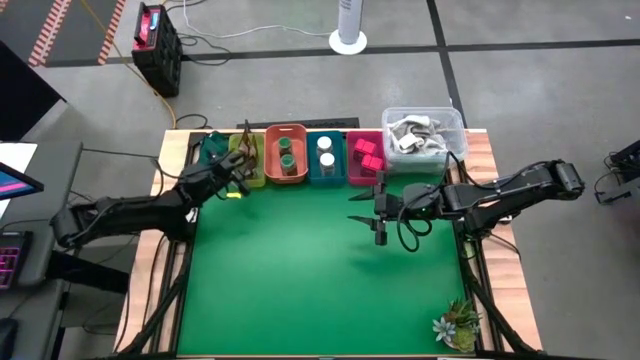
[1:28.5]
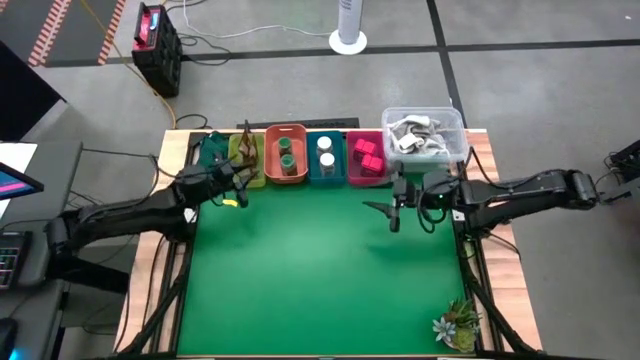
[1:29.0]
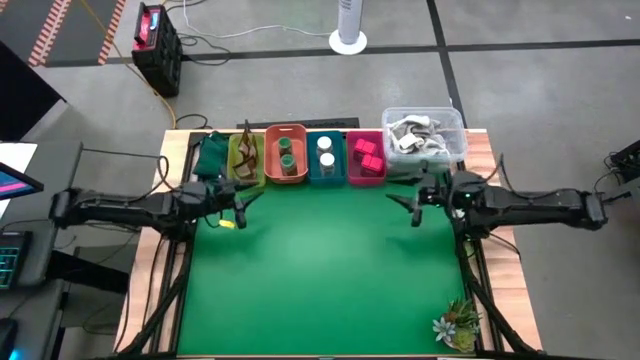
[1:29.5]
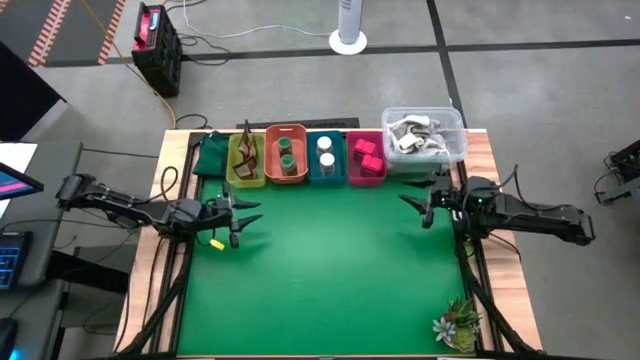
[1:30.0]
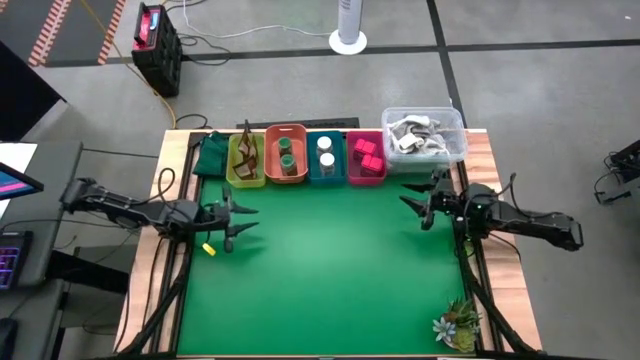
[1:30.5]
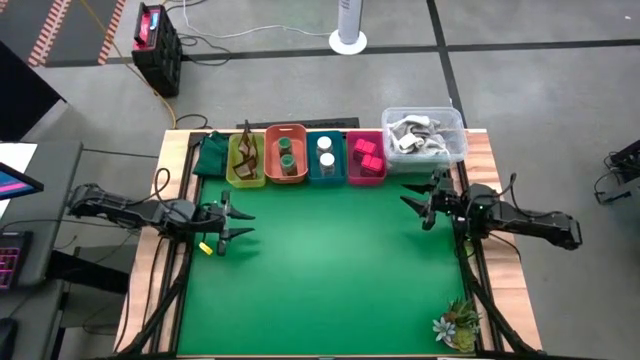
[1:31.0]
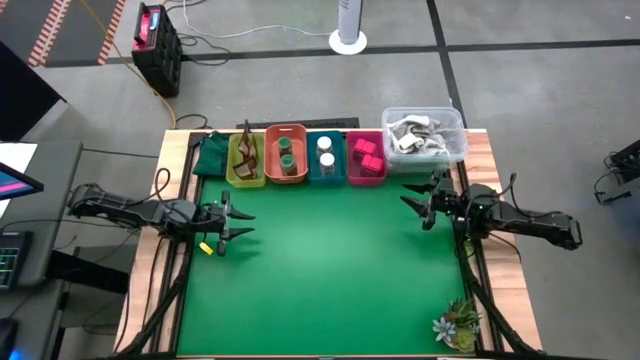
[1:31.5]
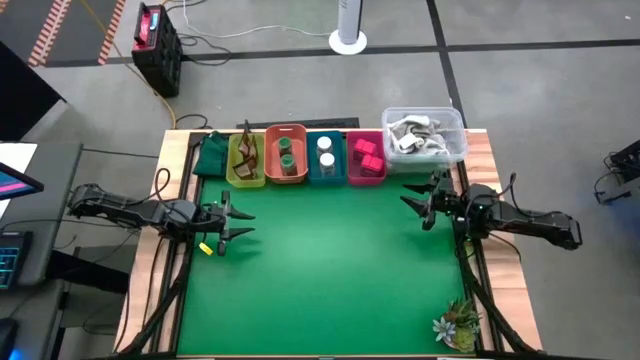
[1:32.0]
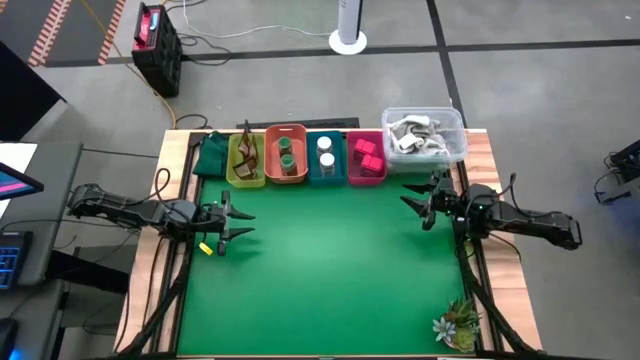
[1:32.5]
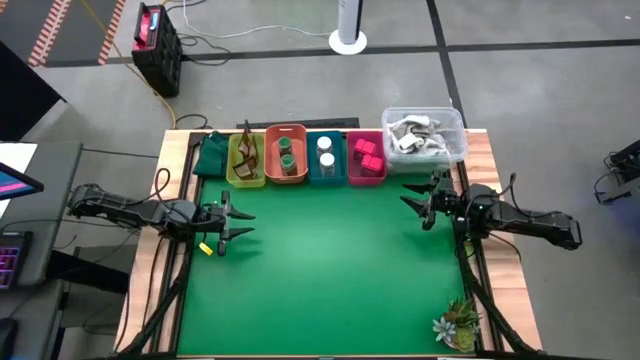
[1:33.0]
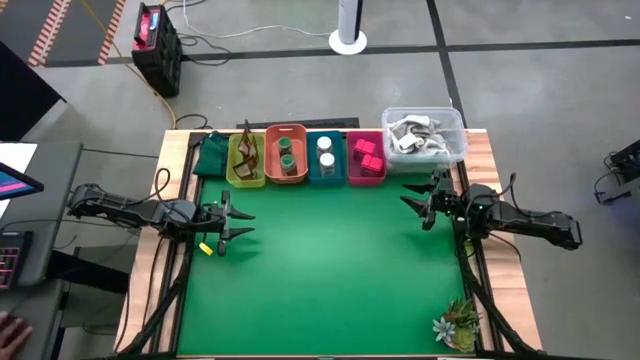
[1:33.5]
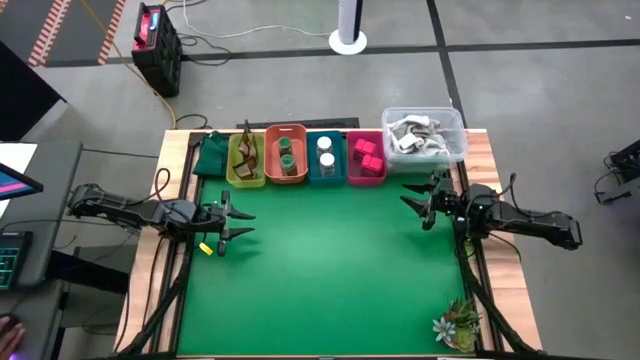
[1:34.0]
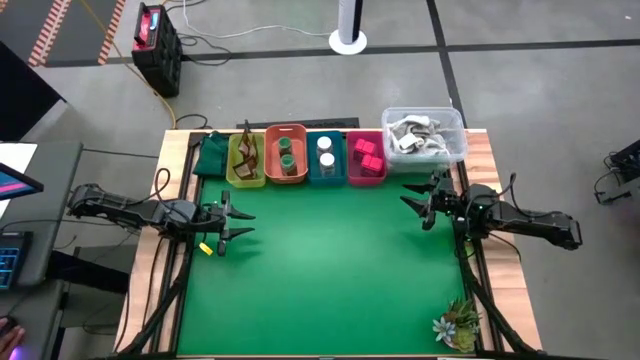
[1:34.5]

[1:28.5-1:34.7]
Task: Sort spices by type
Return to Home Position

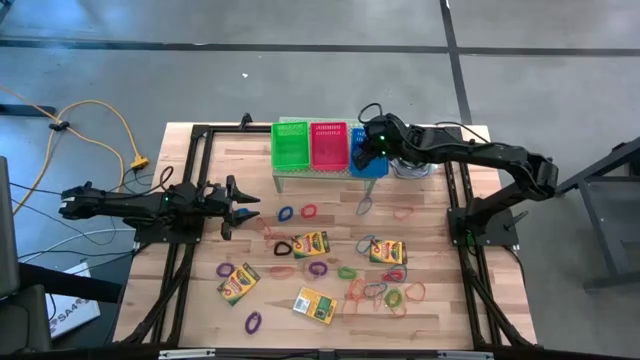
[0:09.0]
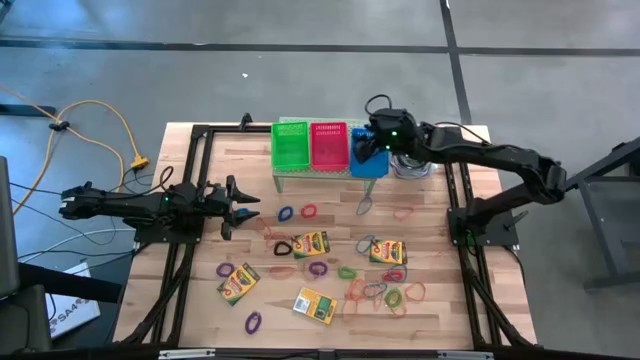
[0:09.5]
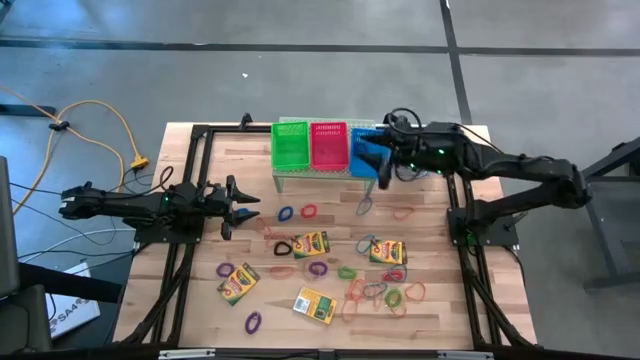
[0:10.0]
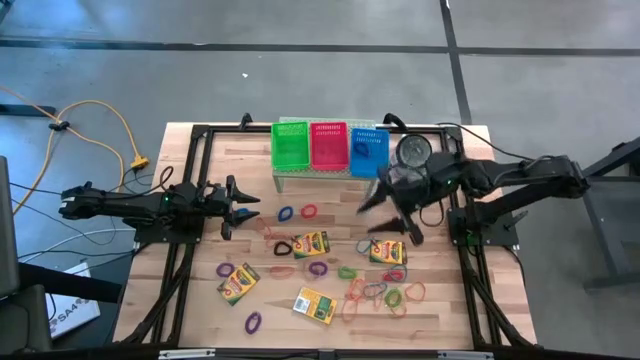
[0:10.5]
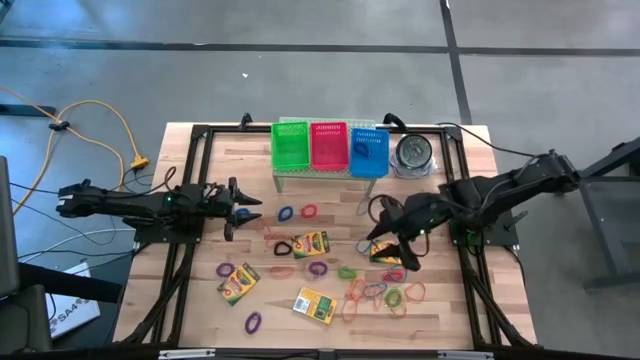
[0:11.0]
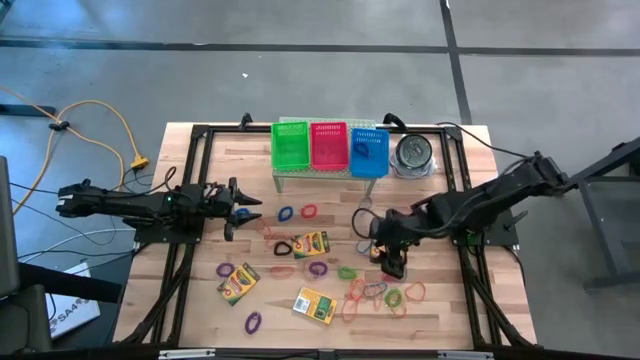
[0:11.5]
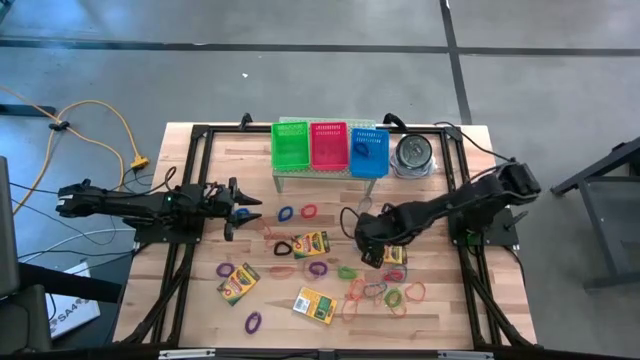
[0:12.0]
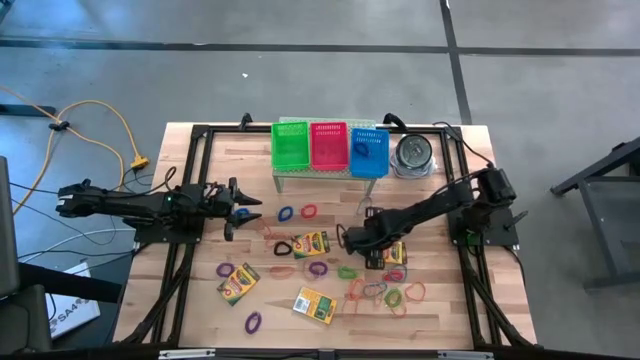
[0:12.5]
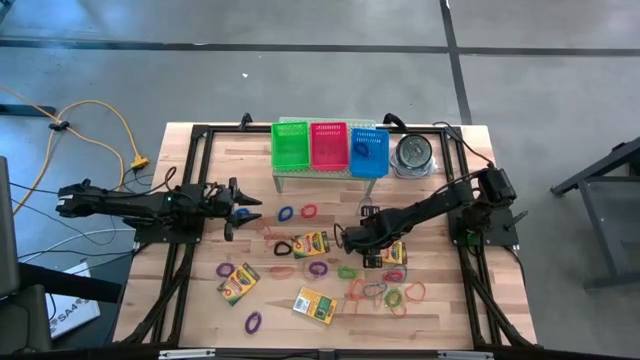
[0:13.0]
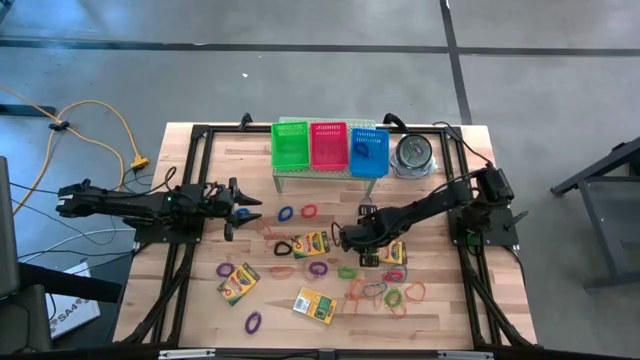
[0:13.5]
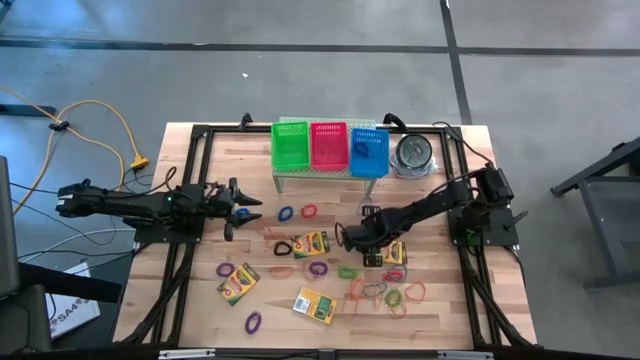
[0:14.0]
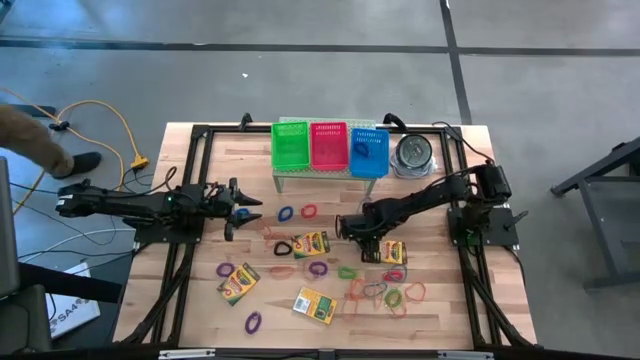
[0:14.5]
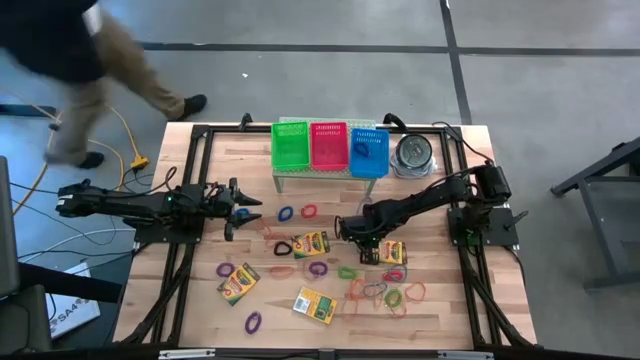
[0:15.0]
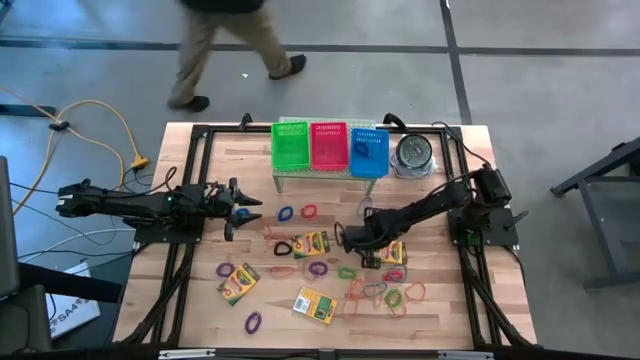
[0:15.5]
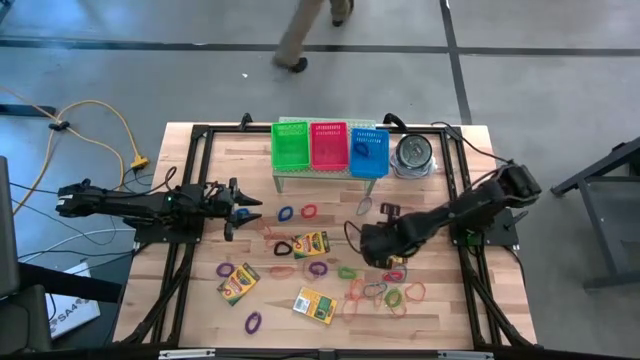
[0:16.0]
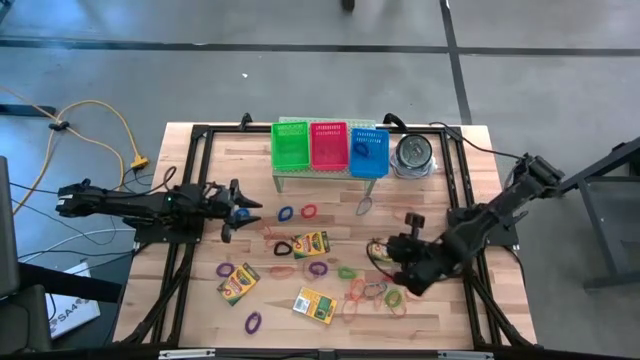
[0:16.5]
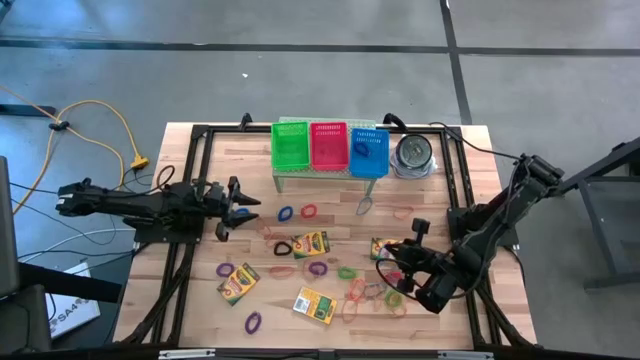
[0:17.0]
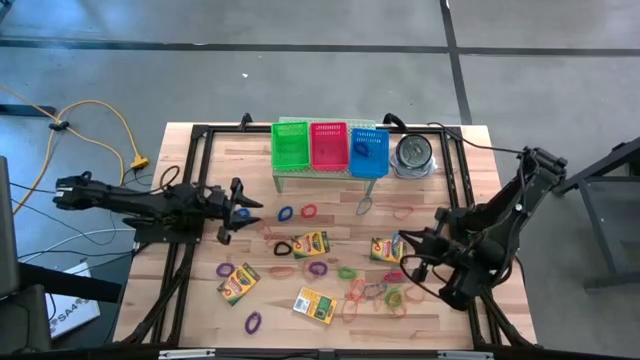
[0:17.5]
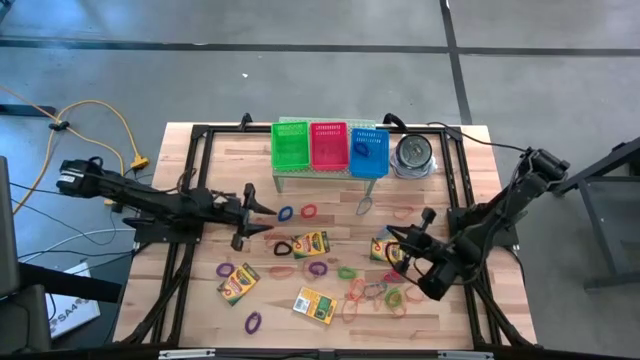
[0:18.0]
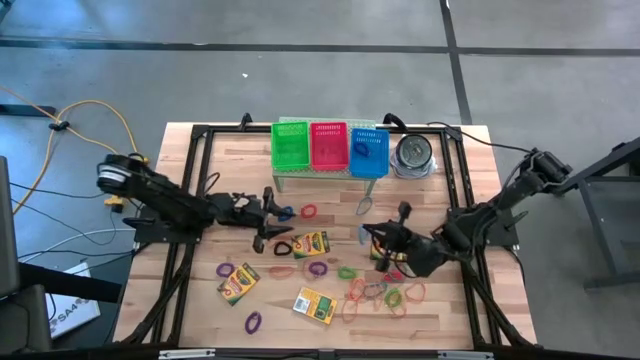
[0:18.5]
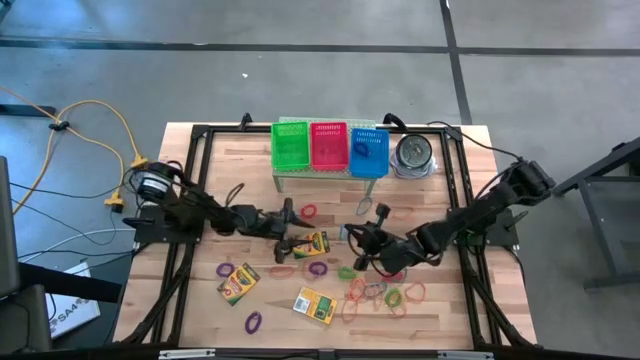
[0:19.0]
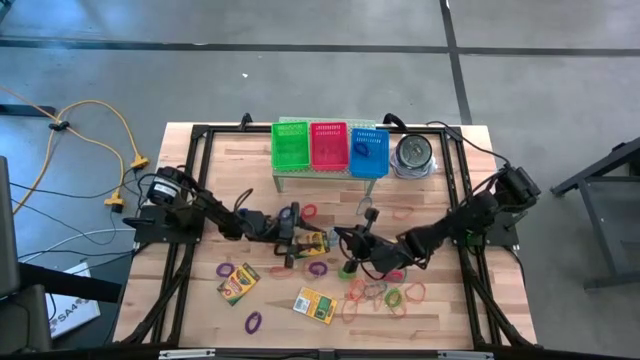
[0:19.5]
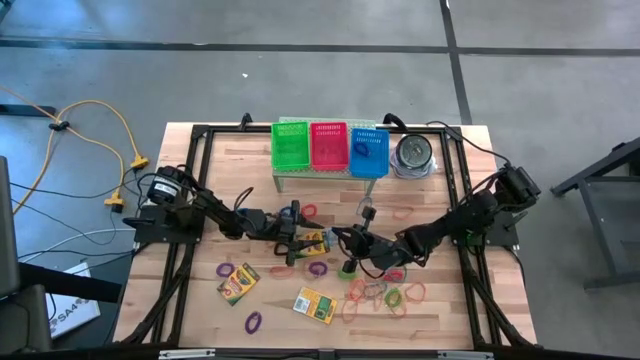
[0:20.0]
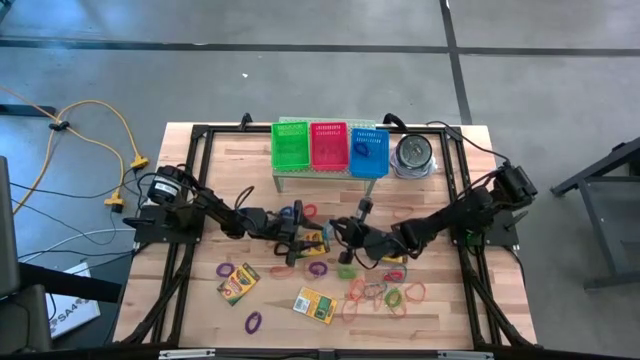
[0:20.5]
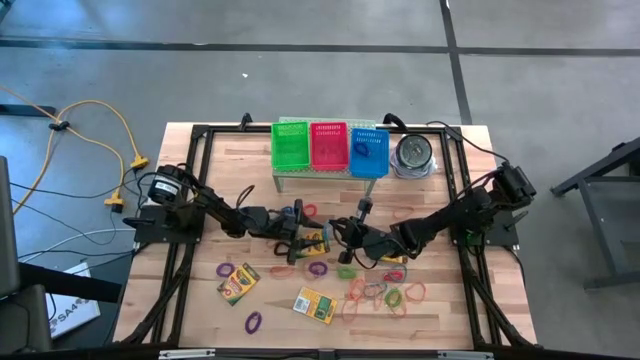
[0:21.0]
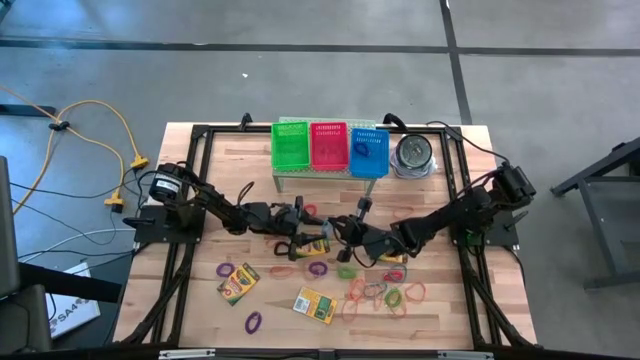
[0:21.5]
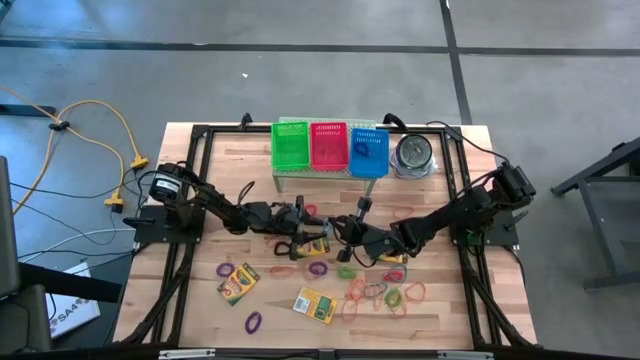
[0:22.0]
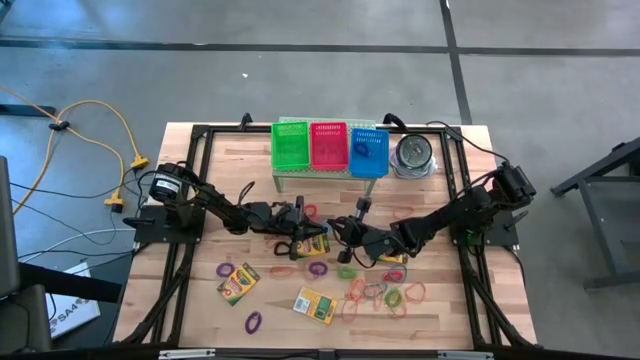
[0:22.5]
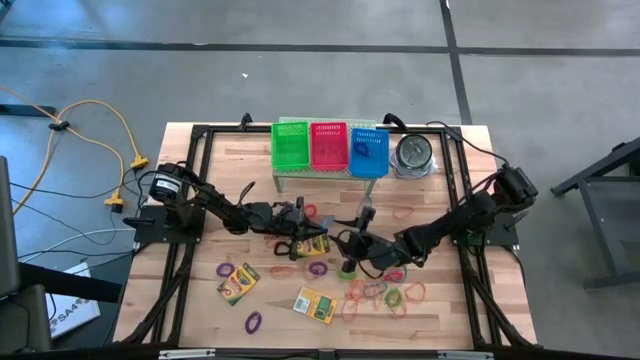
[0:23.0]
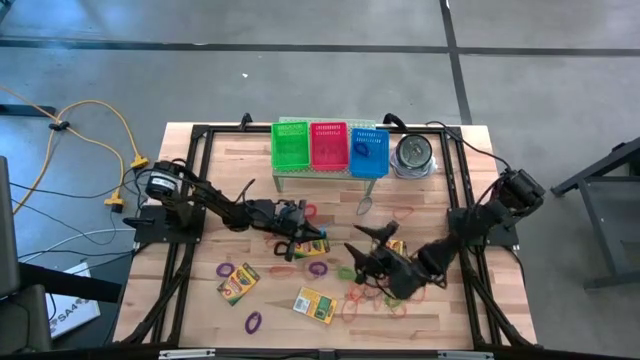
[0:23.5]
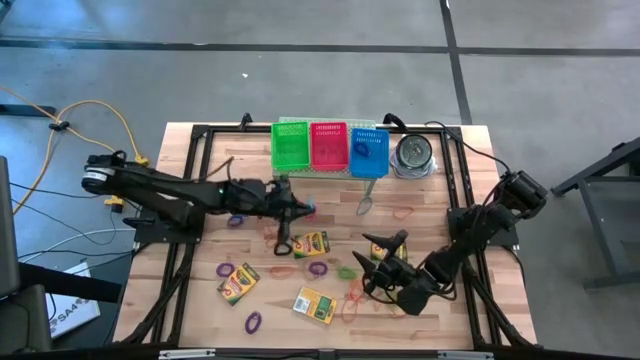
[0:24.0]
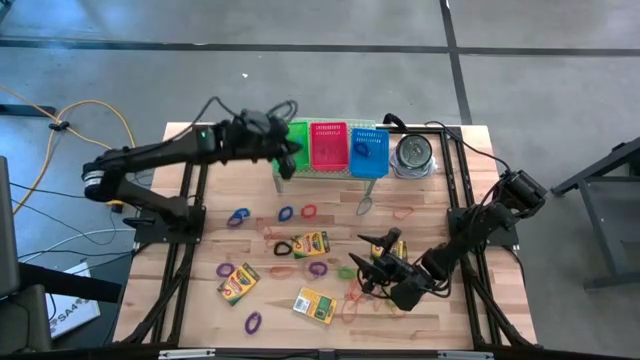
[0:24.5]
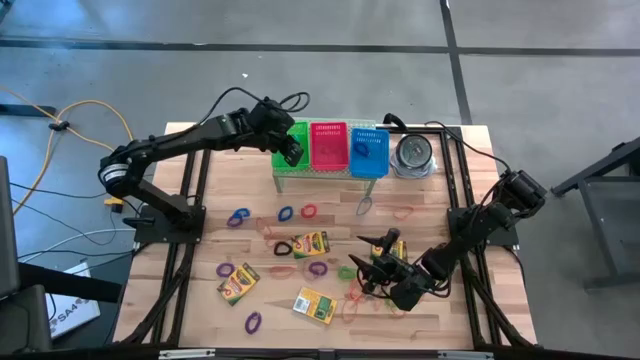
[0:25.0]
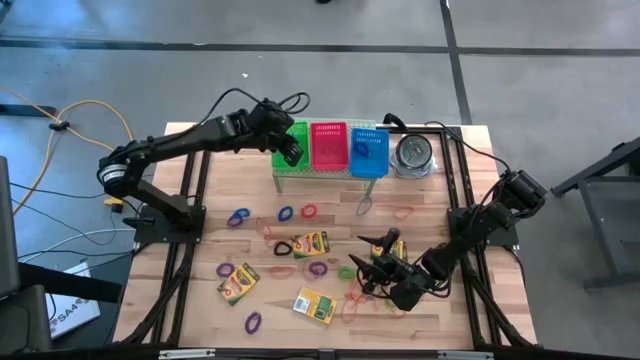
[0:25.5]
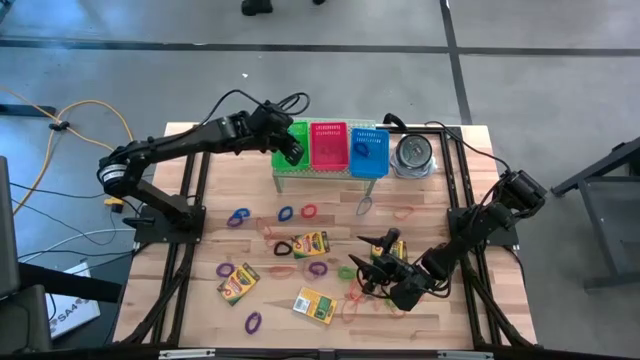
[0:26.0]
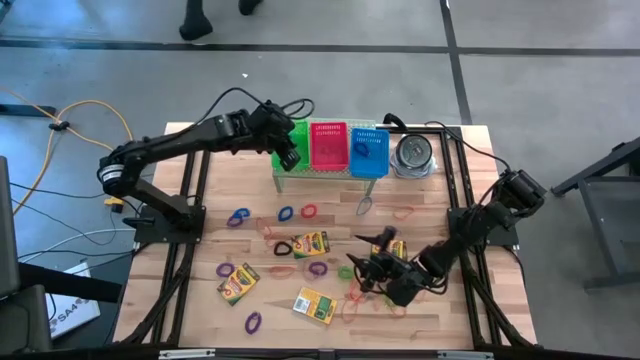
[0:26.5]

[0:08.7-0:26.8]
Task: Pick & Place Office Desk Supplies
Put the blue rubber band into the green bin on the shelf
